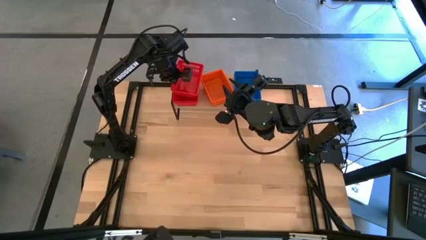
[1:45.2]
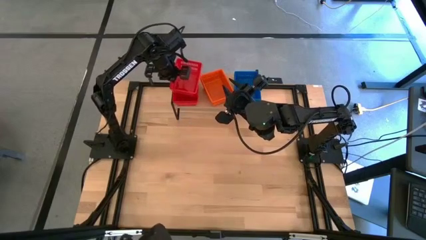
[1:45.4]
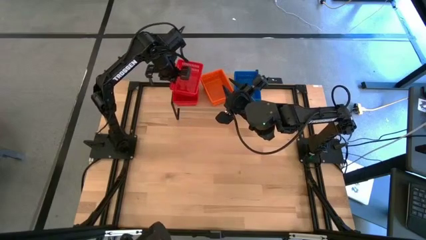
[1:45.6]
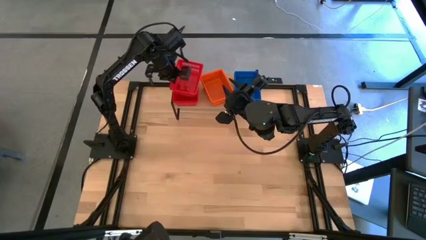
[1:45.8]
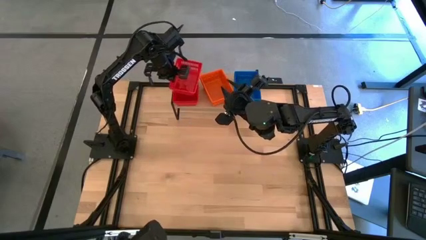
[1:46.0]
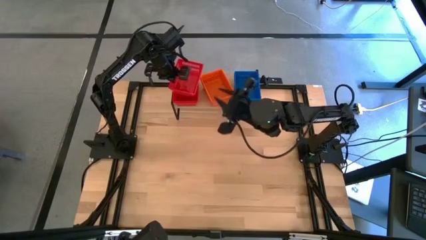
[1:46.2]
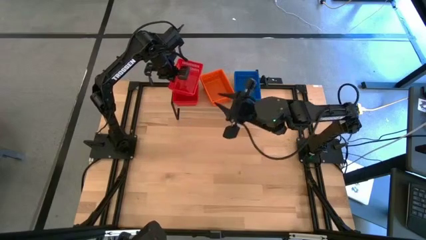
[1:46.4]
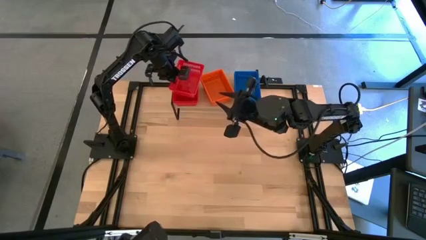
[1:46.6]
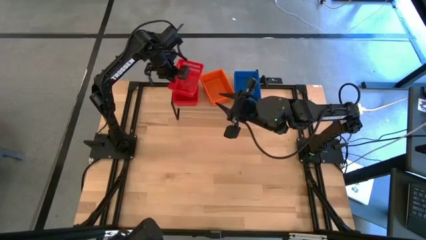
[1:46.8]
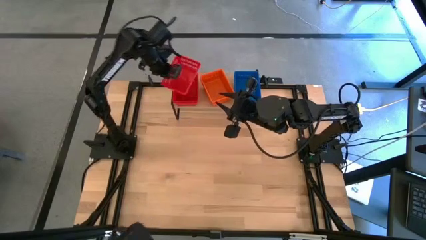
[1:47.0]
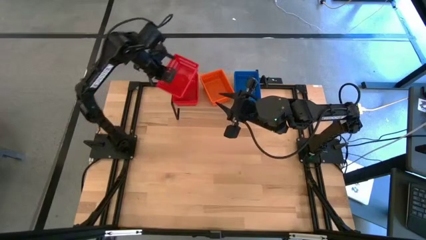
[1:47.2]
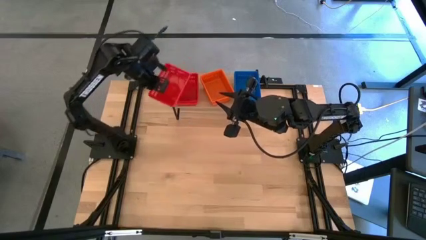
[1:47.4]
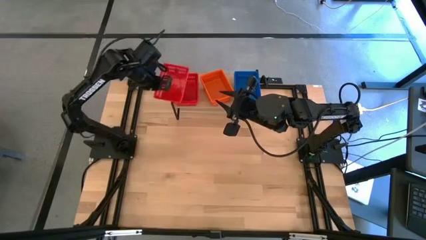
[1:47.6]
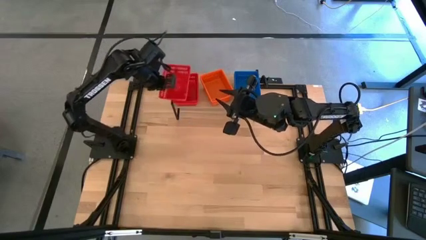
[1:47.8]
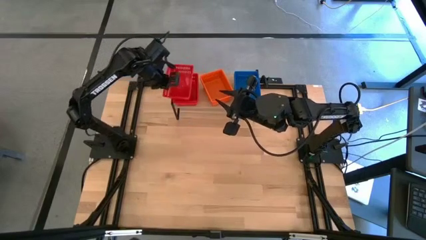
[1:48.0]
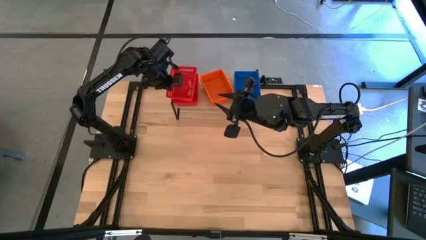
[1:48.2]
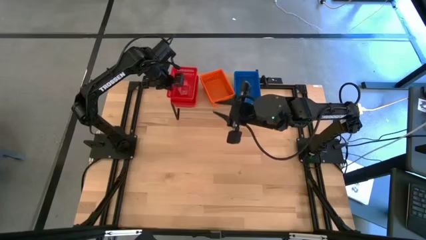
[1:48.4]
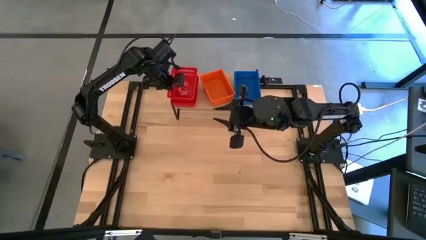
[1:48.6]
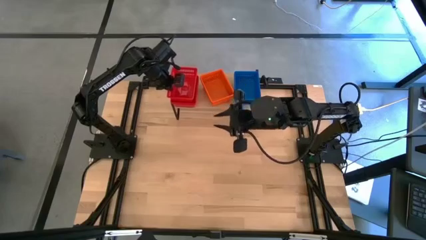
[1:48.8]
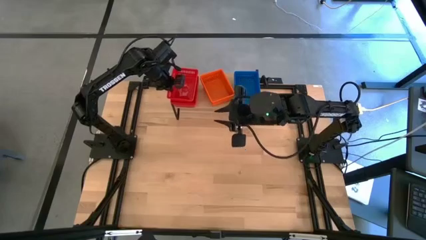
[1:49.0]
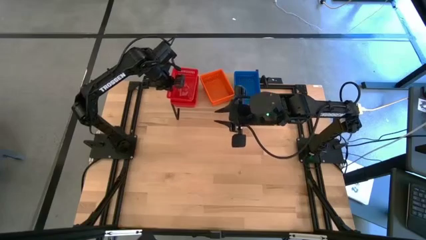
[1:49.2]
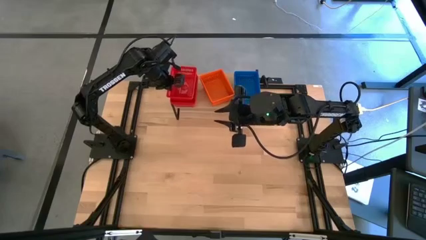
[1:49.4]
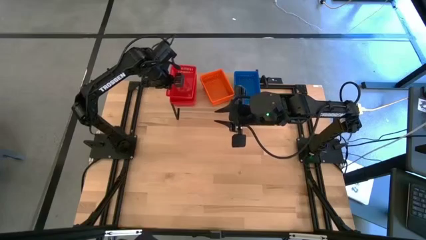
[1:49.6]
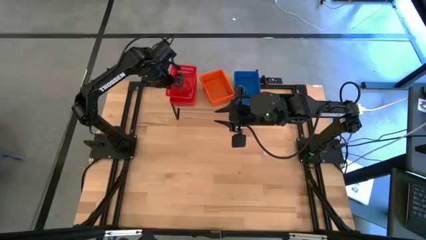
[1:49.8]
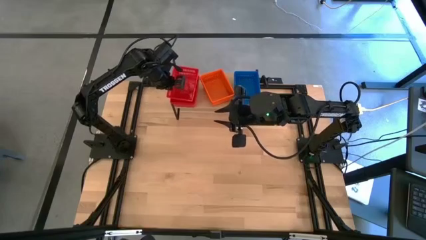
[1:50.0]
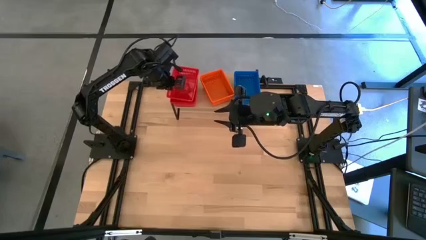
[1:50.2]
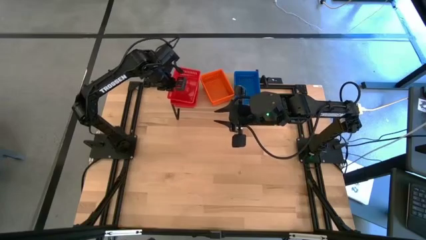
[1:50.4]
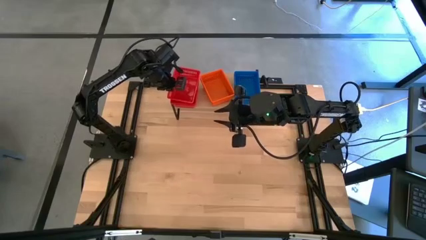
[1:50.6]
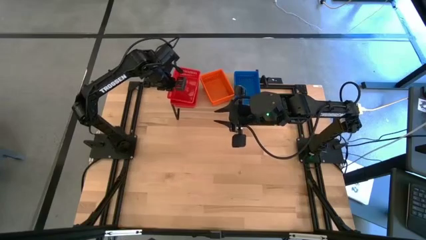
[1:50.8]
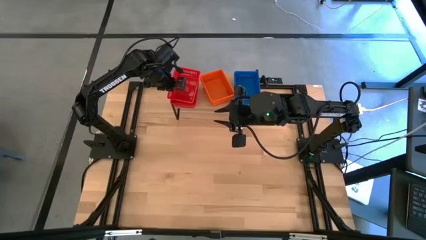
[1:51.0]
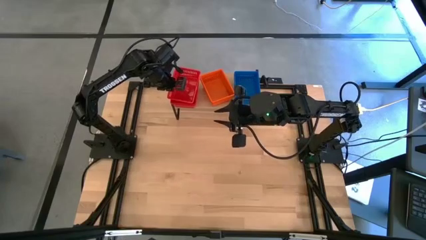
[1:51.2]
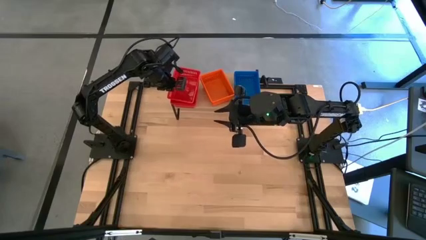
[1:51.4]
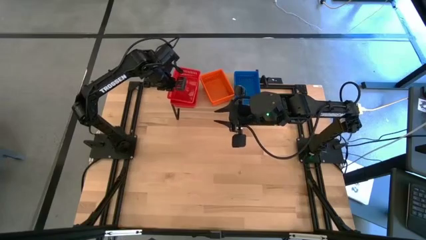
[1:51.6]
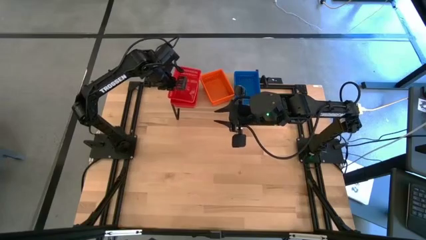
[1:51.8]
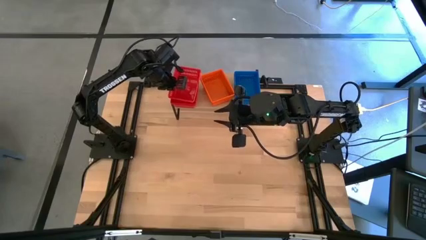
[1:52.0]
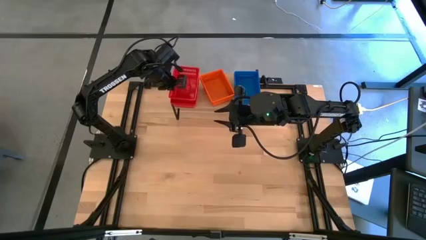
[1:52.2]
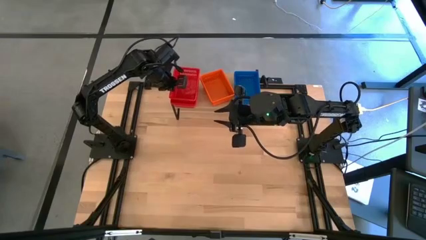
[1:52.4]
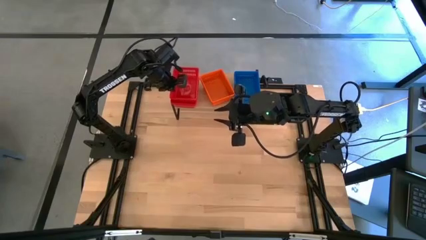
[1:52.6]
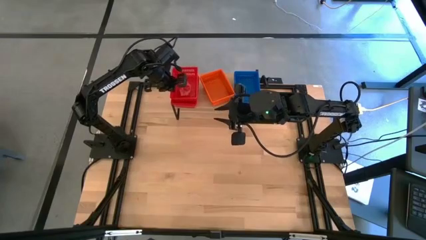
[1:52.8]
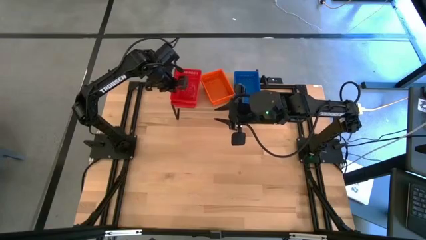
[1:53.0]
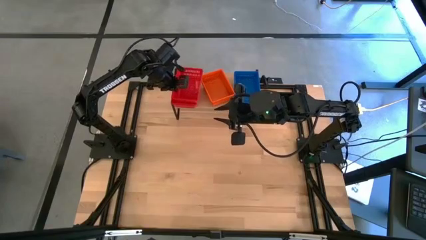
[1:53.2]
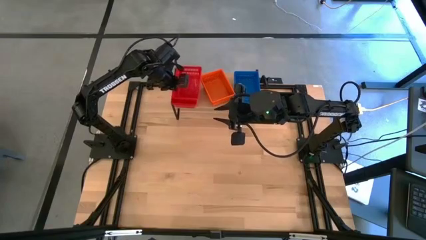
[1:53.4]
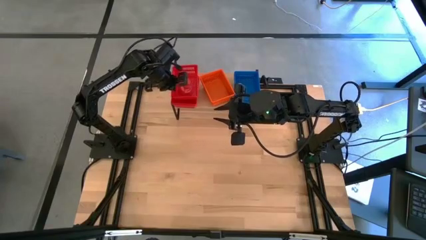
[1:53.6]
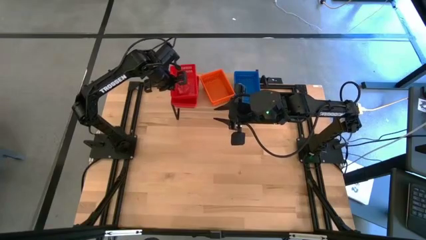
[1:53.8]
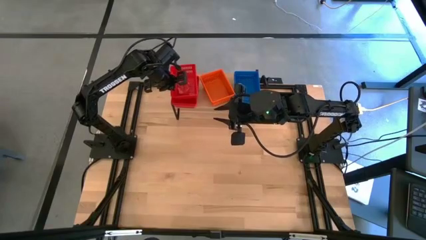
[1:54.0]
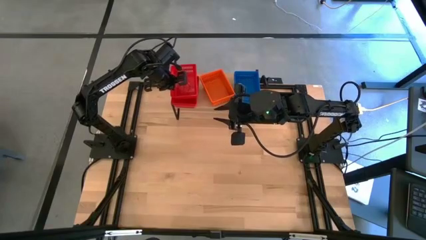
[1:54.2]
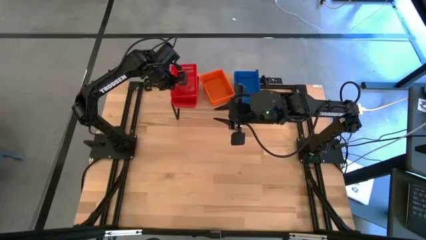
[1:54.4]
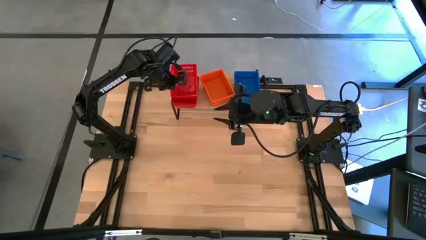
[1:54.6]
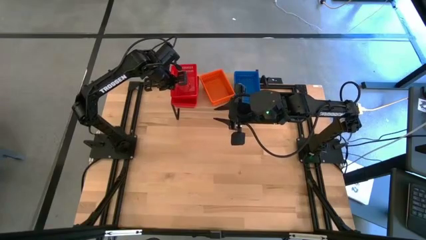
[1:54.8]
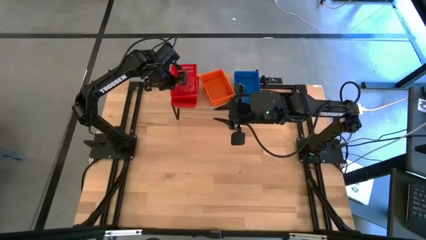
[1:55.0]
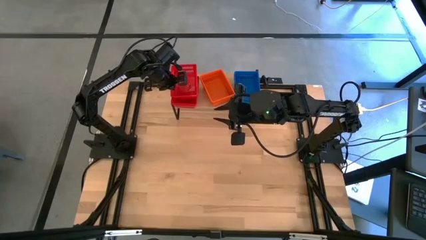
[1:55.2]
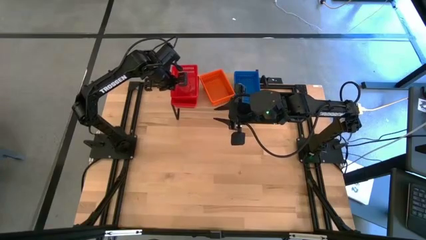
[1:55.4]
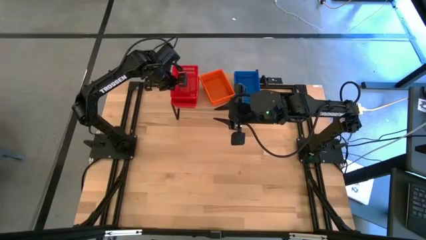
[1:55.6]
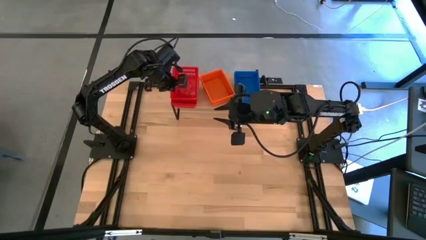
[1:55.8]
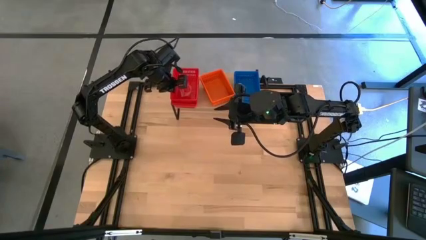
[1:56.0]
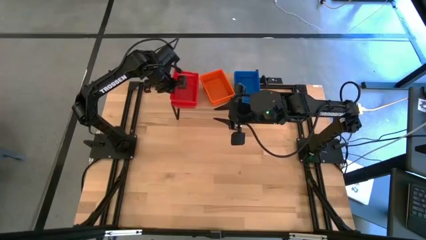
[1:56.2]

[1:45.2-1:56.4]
Task: Stack baskets on shelf by color
Stack the red basket into the red basket on the shelf

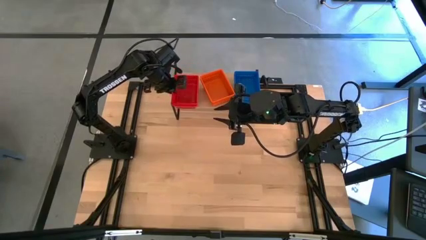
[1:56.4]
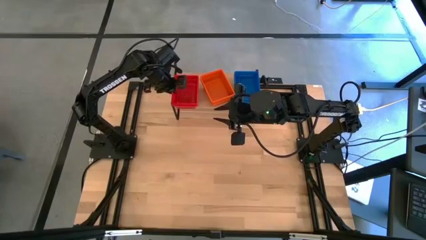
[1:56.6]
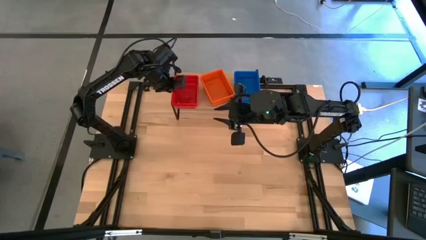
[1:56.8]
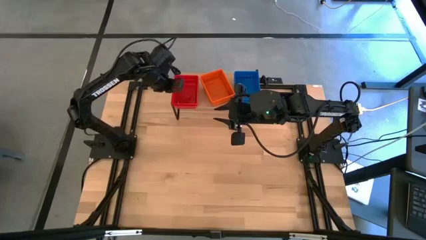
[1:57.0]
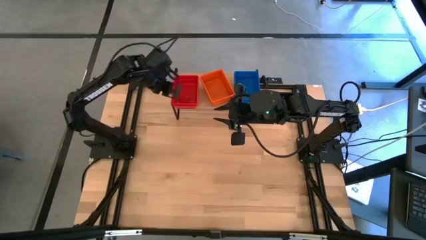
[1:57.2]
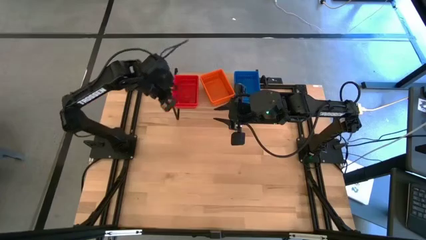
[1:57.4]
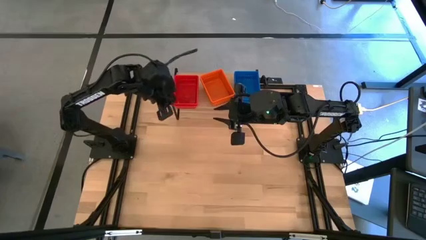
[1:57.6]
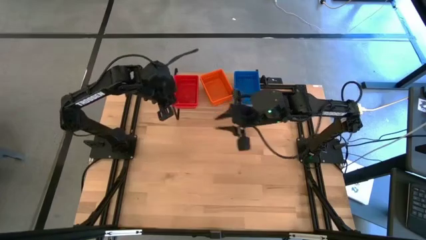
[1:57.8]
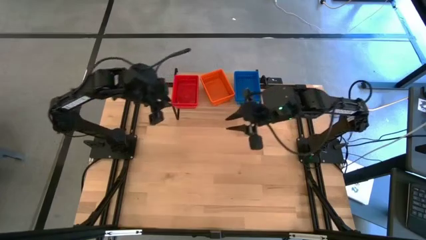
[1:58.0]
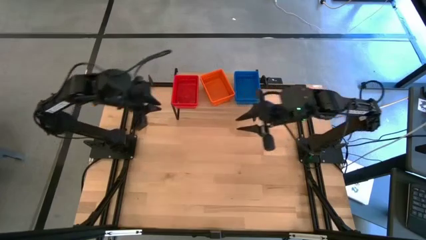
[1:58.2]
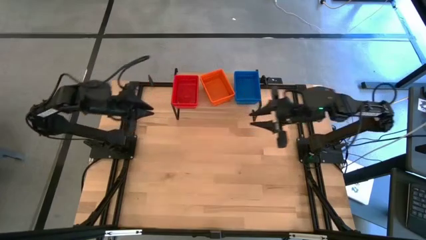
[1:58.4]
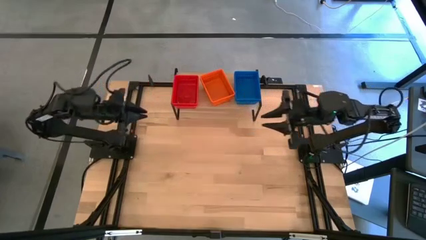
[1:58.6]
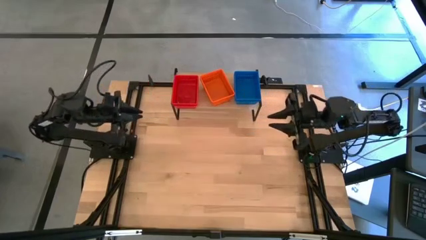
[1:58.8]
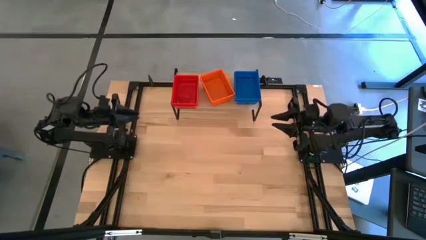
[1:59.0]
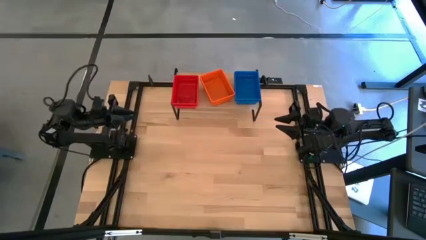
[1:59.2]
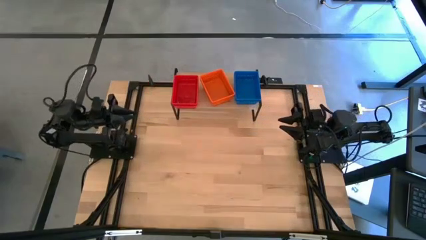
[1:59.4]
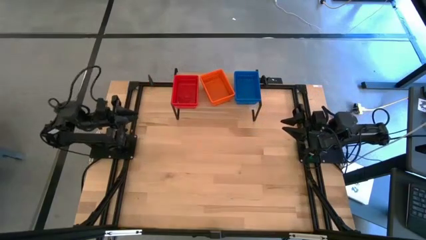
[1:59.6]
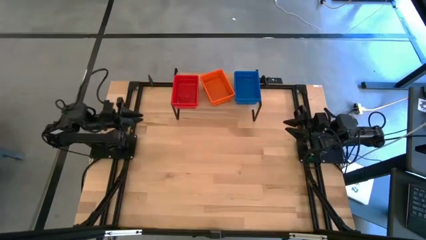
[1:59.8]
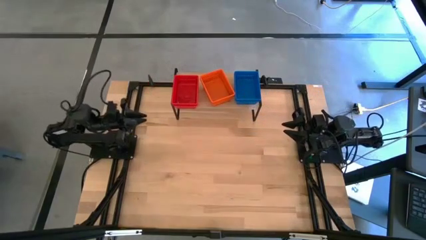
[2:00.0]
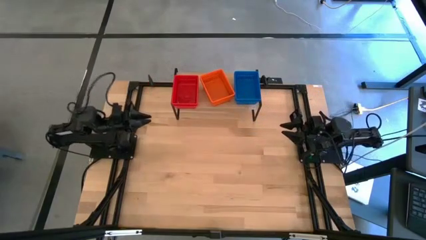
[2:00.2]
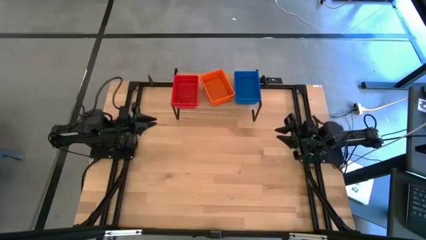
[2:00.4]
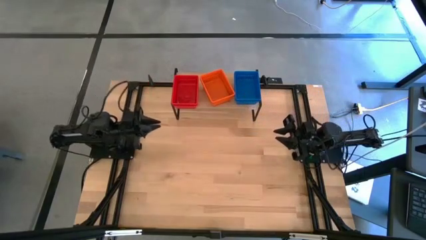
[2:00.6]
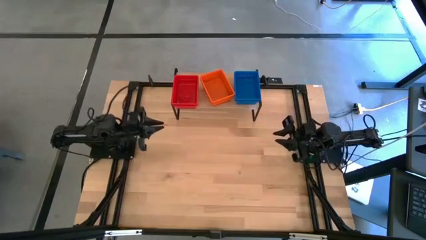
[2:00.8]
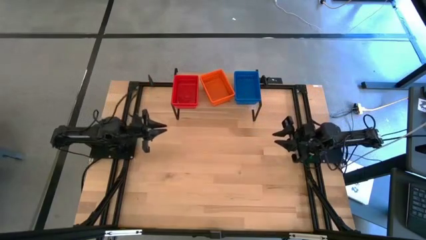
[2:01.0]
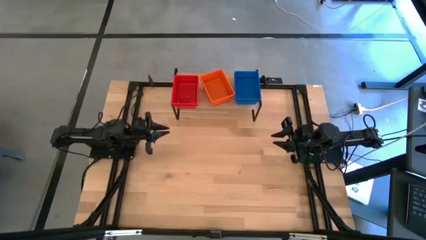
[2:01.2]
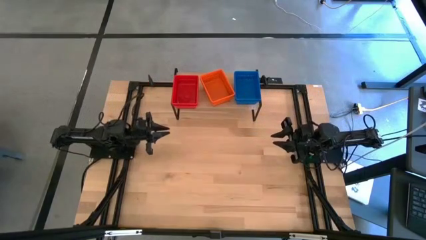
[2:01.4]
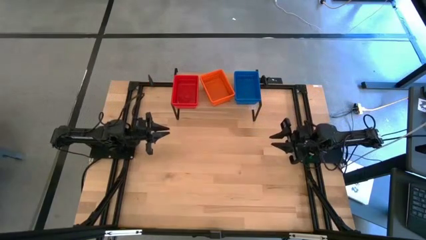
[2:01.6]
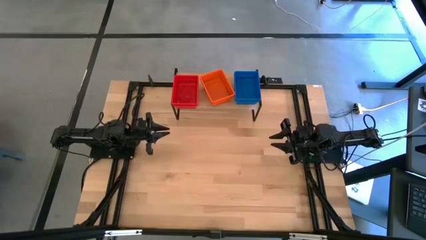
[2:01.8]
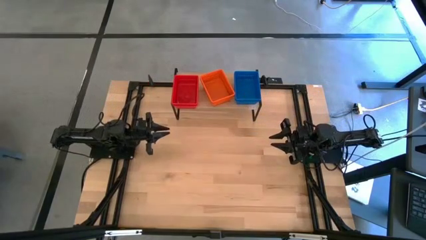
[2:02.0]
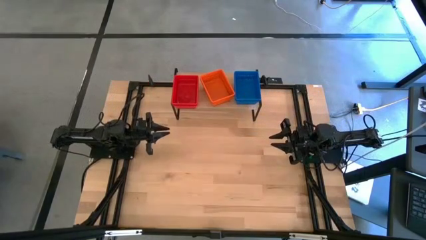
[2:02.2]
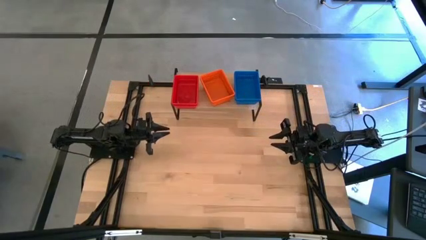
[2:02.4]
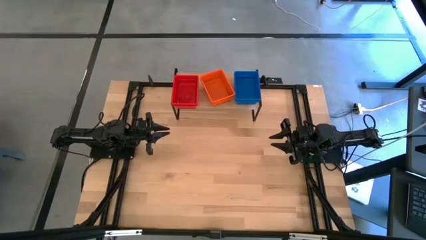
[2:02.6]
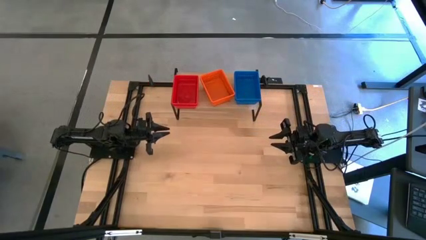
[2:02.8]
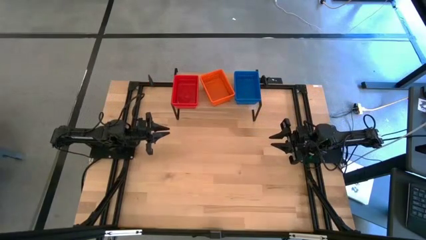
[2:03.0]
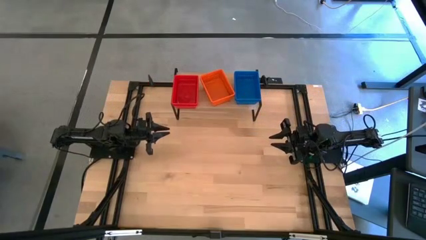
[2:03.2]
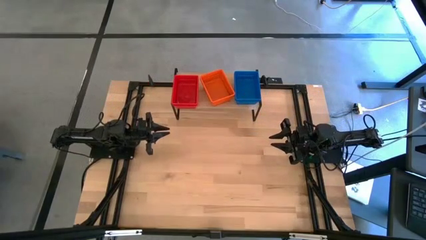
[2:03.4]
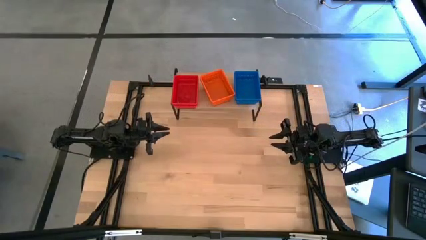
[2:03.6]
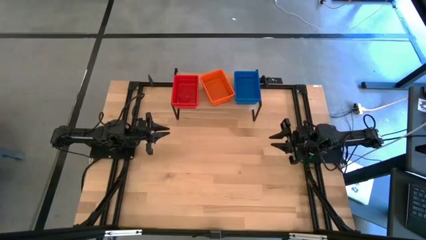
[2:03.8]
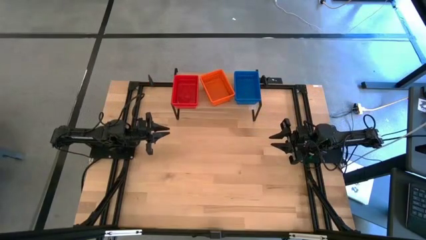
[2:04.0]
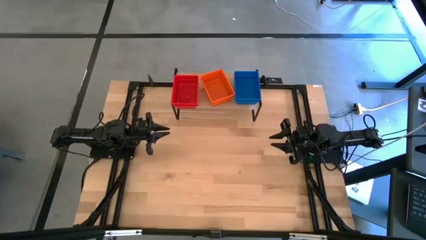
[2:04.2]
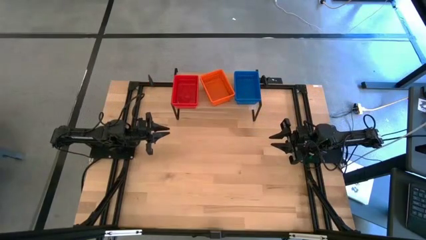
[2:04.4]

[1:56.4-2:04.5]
Return to Home Position
